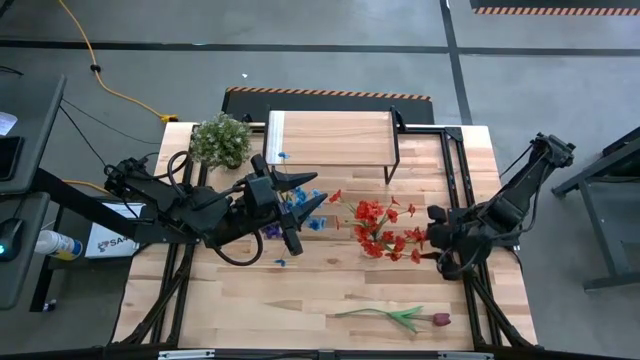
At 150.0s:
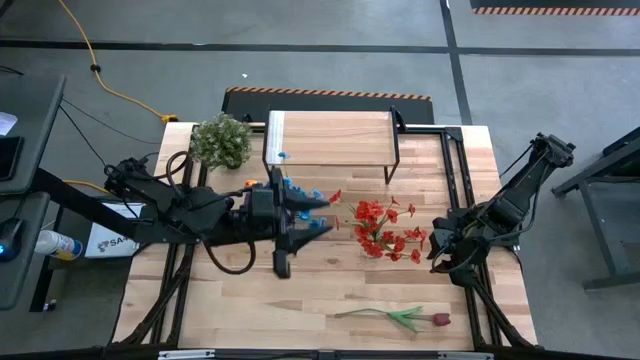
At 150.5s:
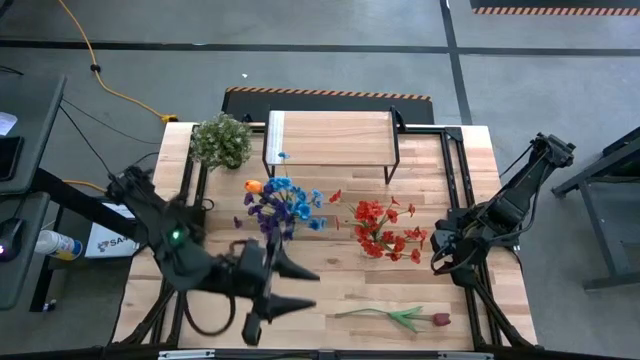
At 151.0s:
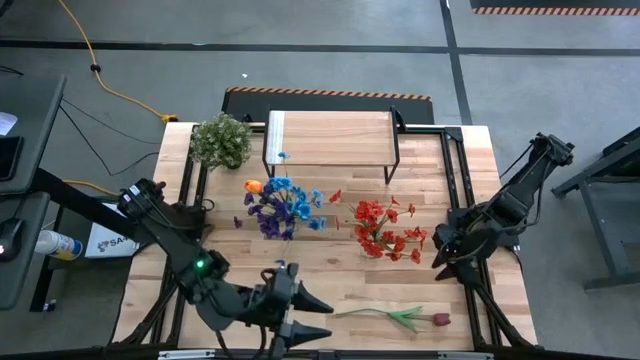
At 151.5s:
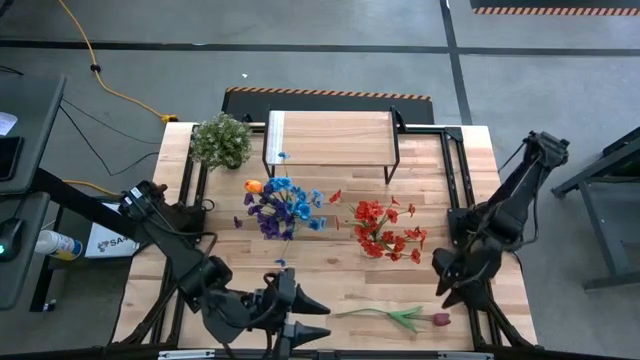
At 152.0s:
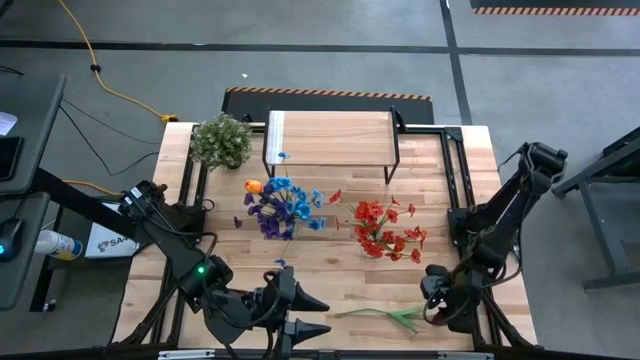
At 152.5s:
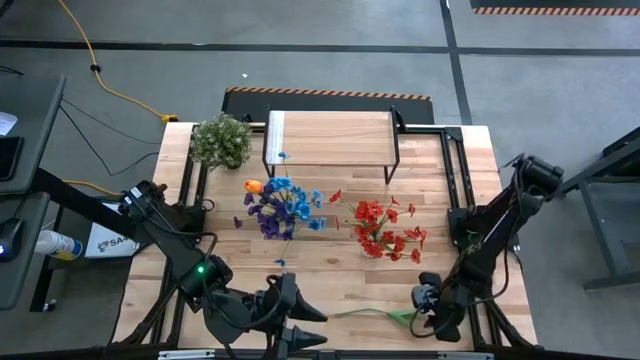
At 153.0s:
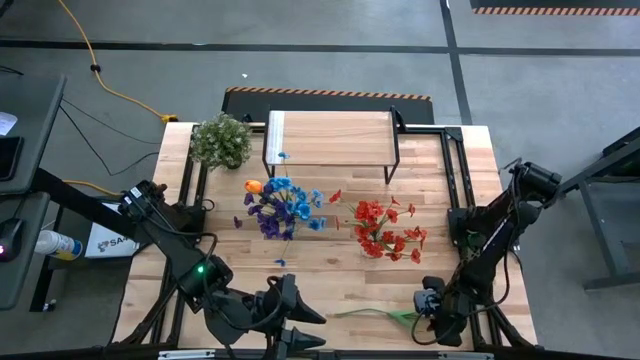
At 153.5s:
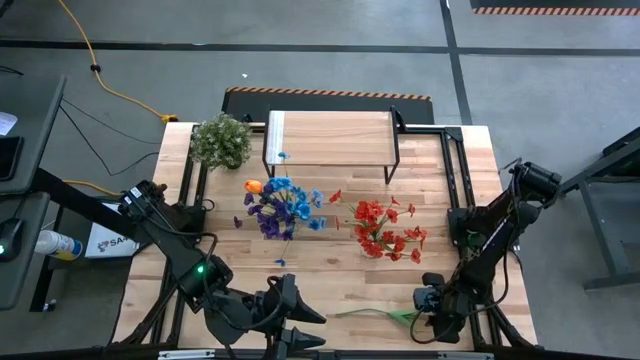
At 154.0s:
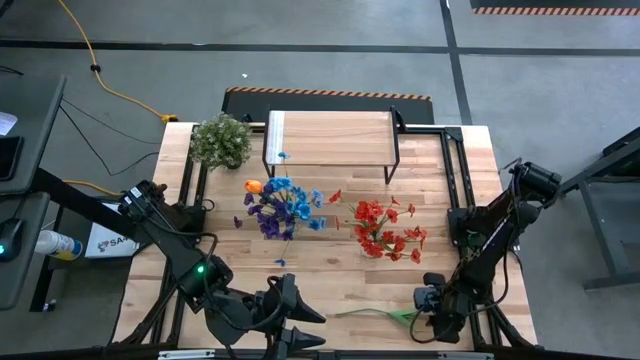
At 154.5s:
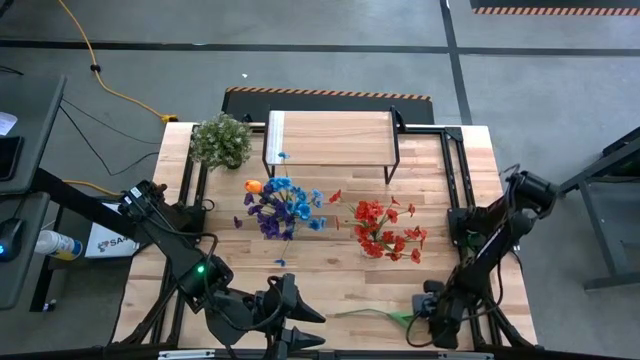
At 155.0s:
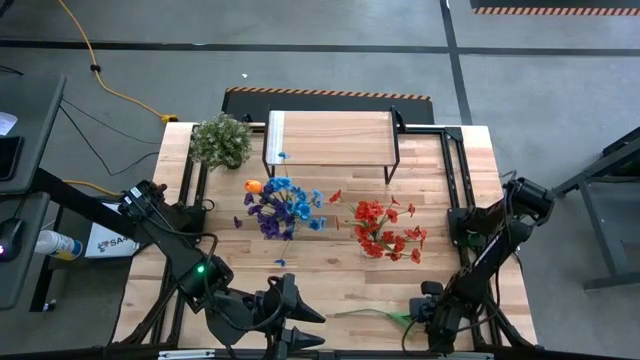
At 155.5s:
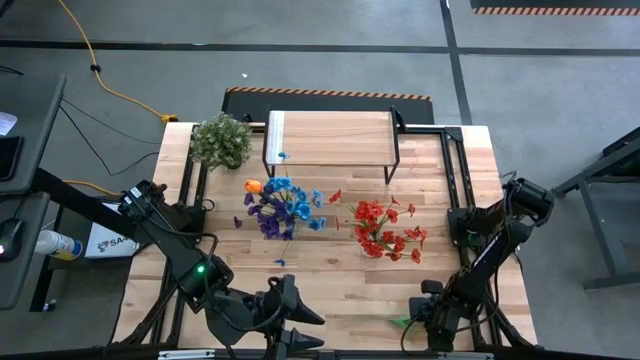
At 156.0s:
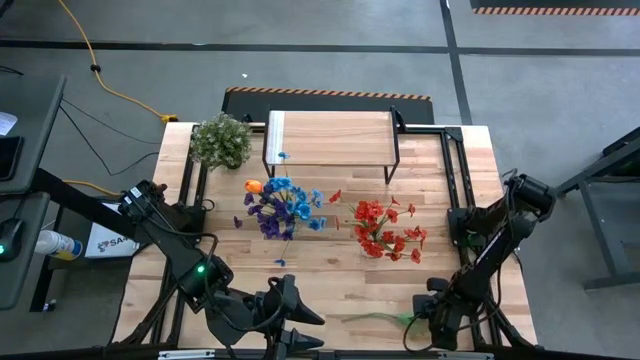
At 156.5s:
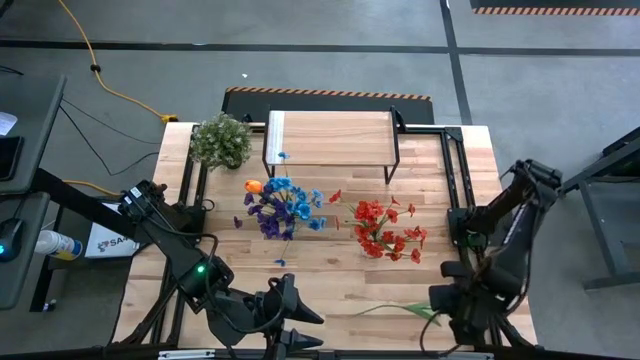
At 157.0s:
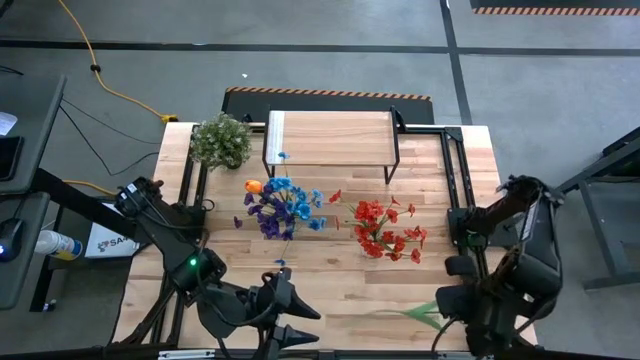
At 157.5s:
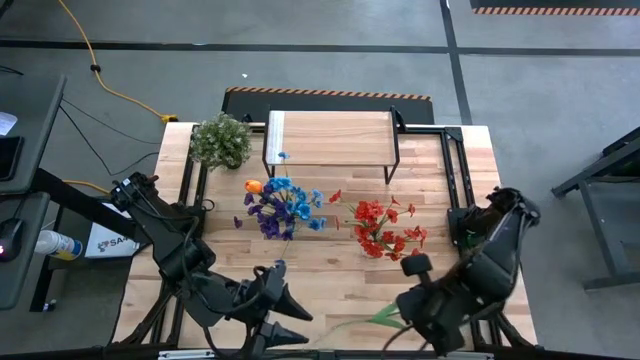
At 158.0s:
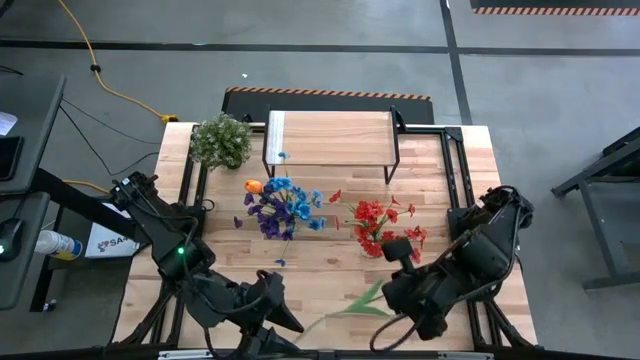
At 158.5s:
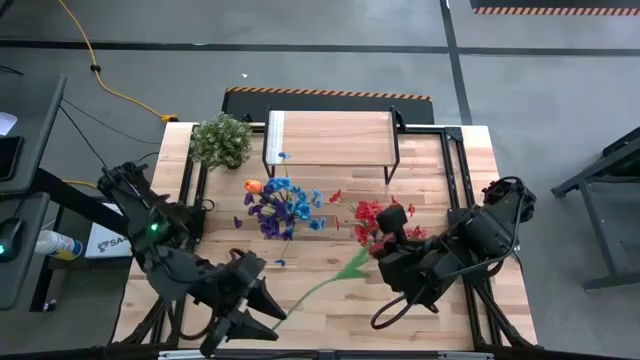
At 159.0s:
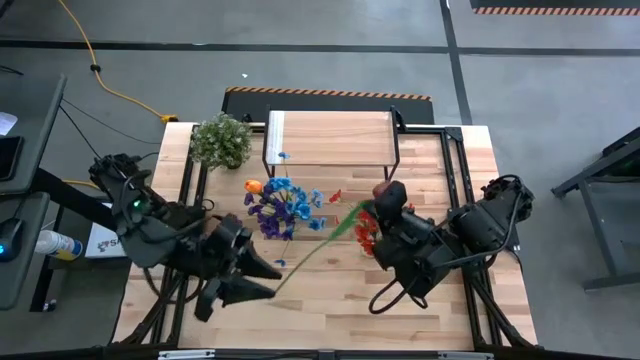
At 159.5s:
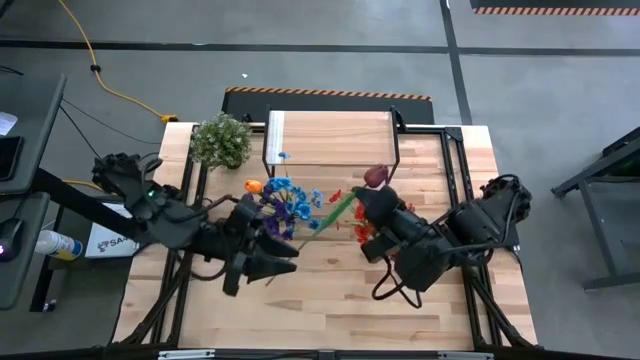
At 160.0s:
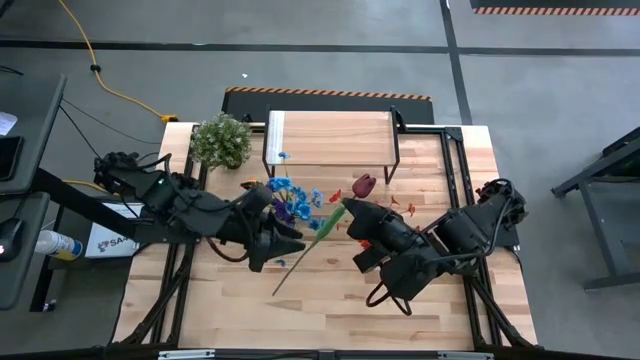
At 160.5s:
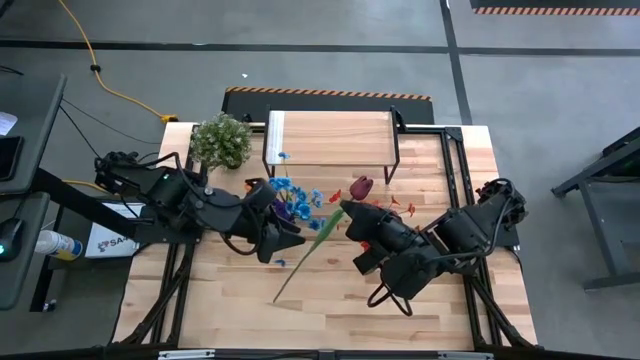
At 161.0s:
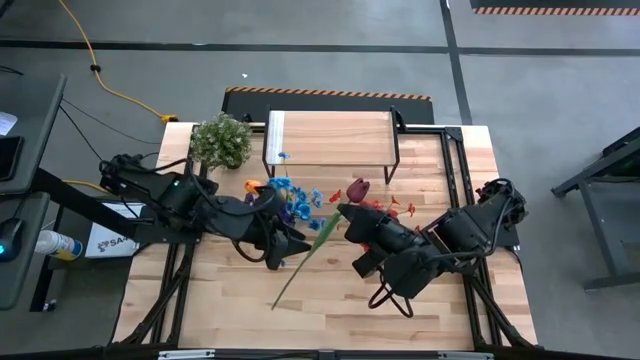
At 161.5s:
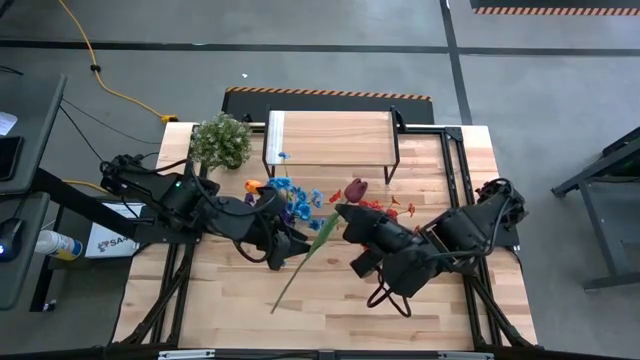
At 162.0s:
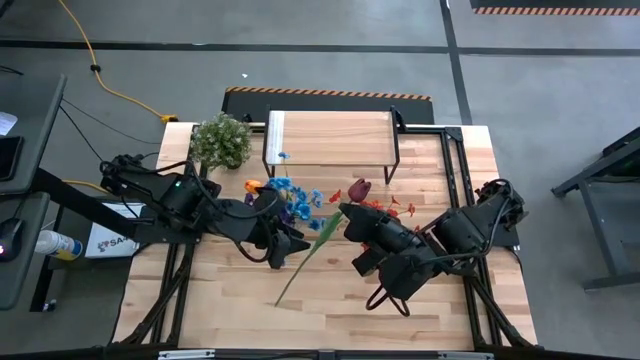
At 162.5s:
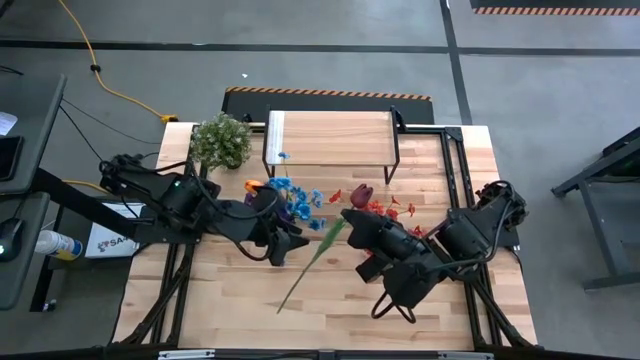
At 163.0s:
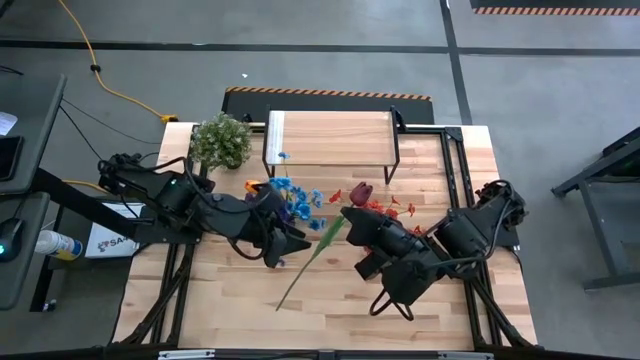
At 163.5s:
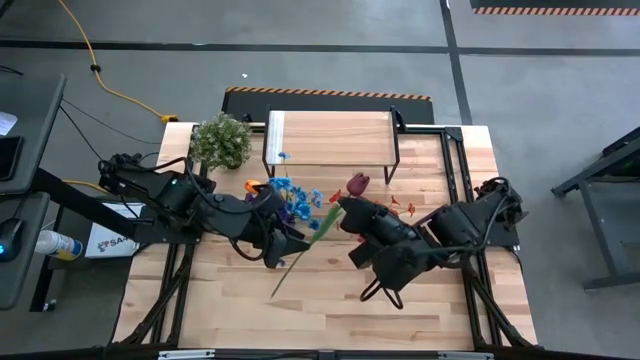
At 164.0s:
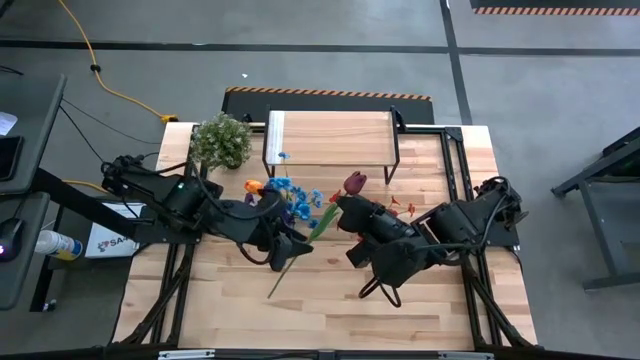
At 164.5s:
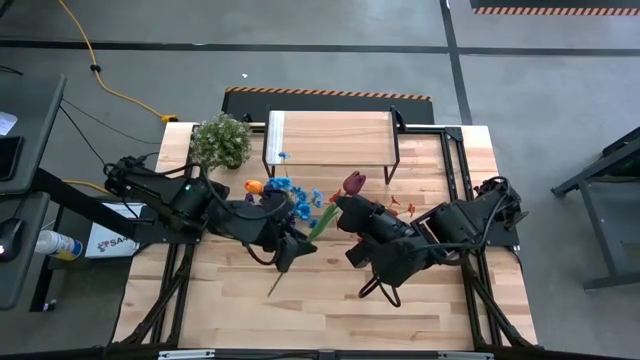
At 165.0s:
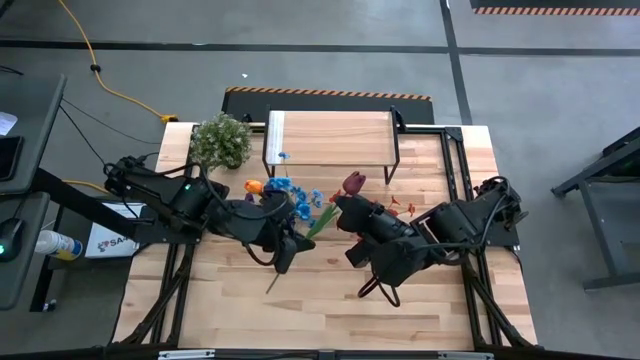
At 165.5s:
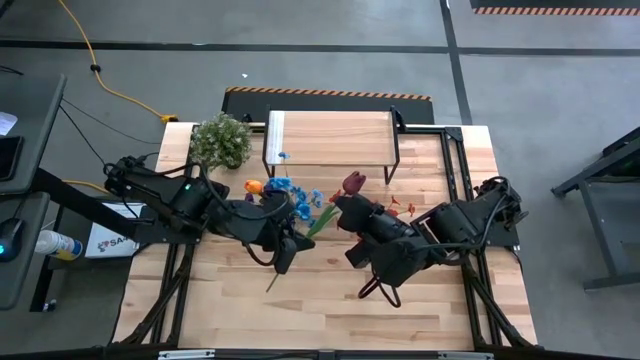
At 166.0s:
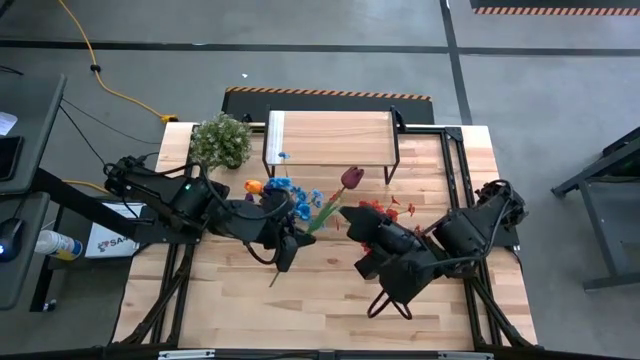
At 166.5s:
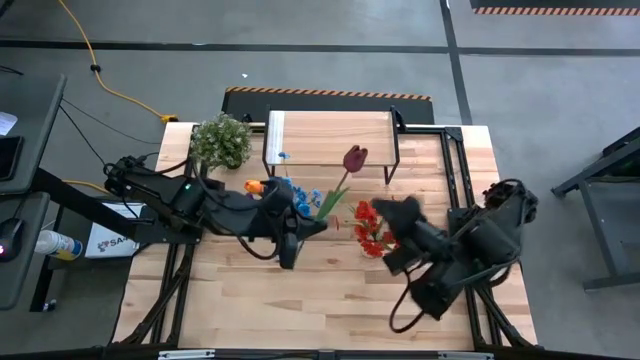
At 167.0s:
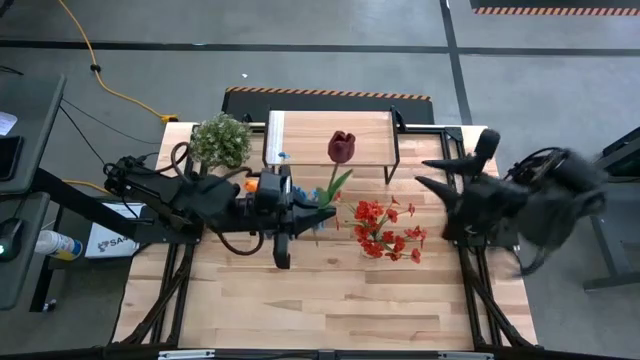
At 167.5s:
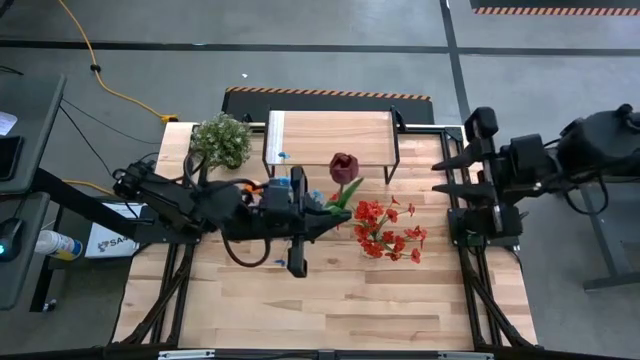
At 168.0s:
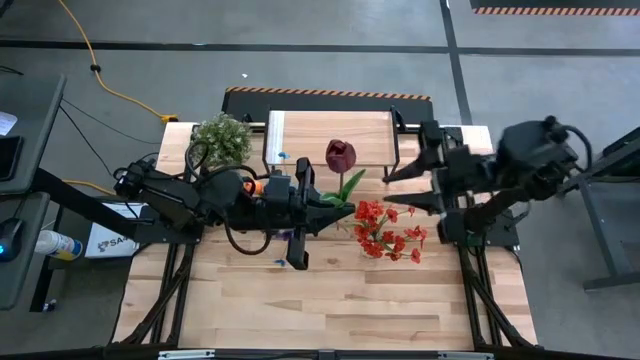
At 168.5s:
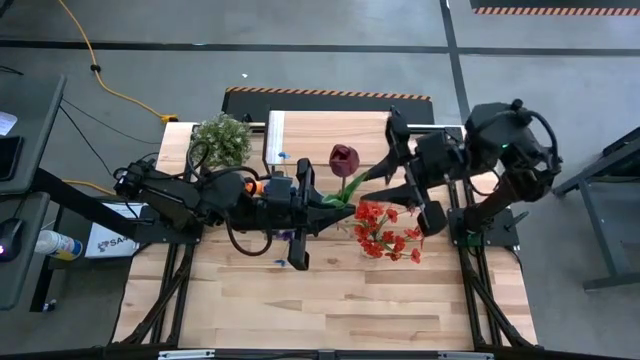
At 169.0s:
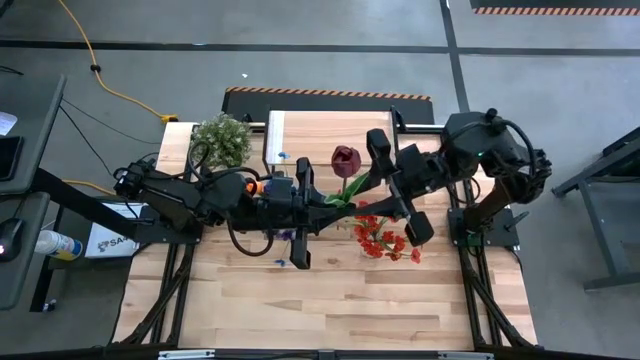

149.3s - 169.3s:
Task: Pick and place flowers into a vace then onto a shelf
Put the dark red flower into the right transparent vase

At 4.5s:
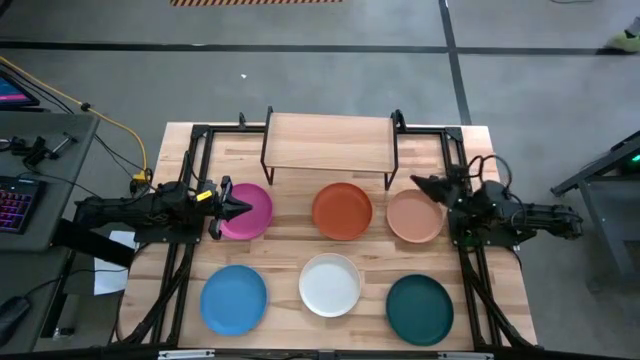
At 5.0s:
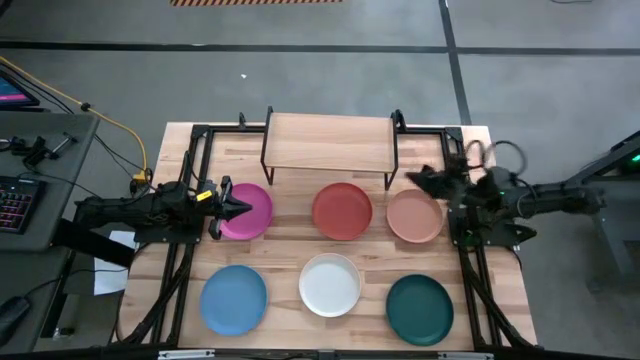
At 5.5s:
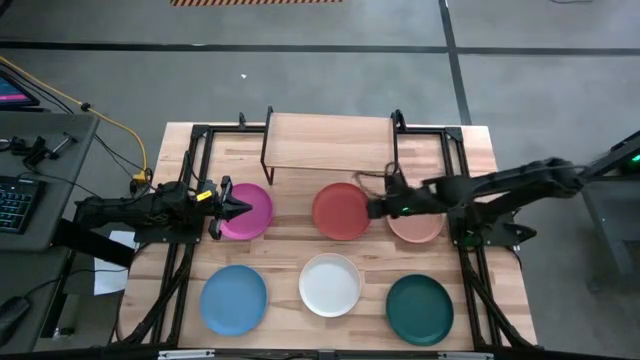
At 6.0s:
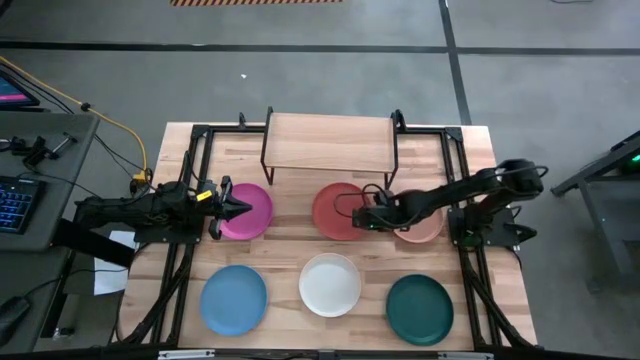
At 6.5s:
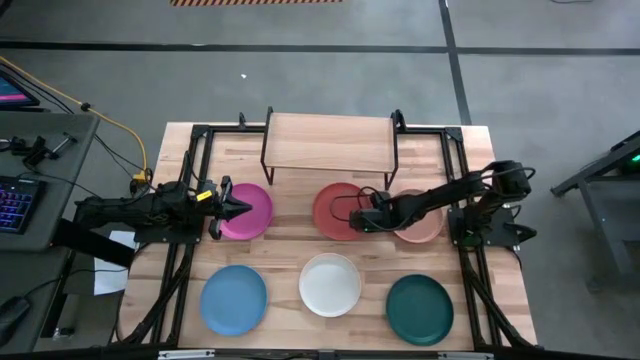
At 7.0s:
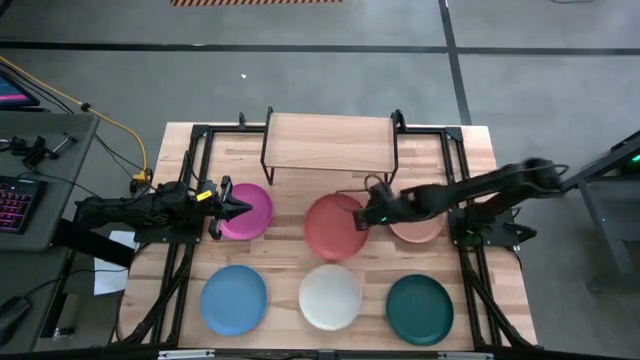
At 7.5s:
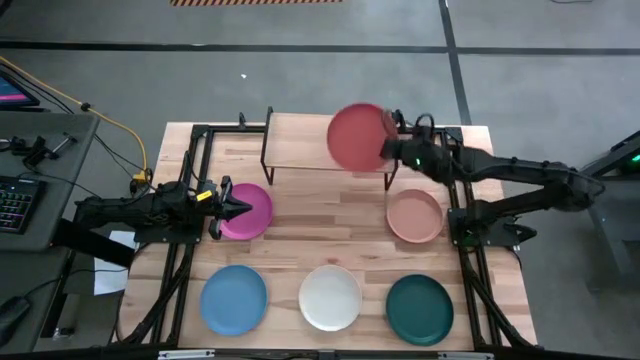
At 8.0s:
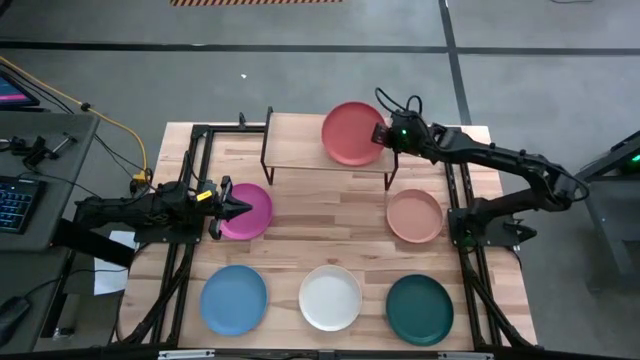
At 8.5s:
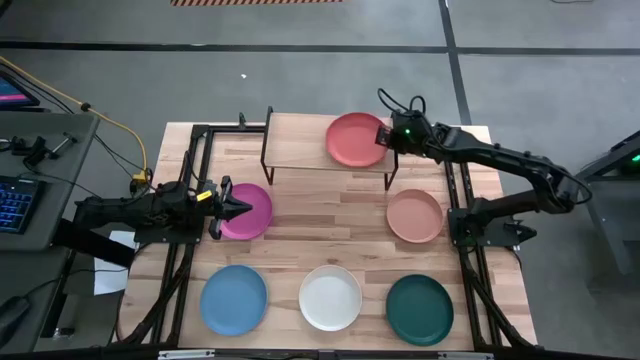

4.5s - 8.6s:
Task: Place and stack plates onto a shelf
Put the orange plate on the shelf
